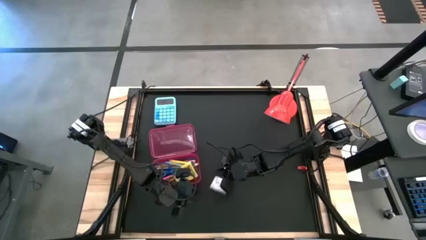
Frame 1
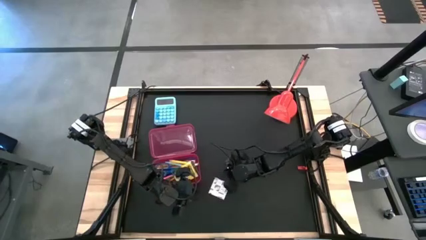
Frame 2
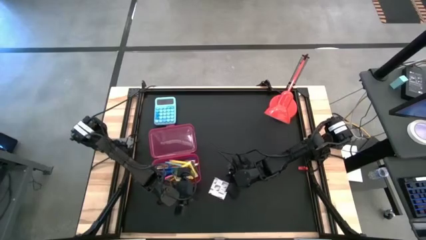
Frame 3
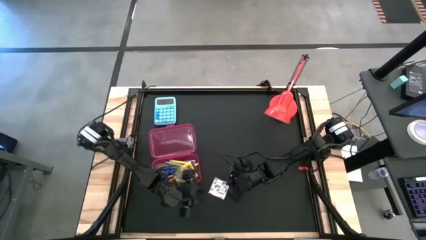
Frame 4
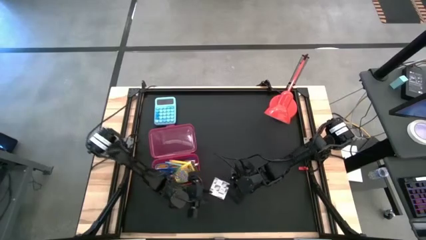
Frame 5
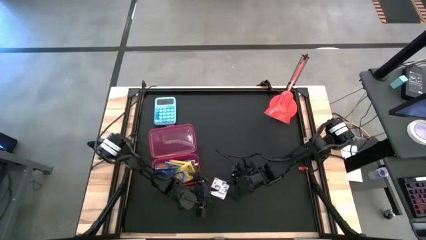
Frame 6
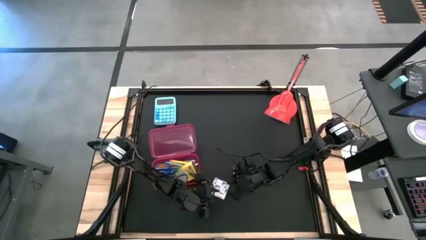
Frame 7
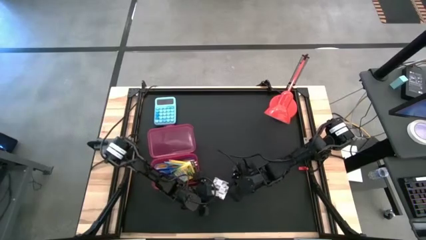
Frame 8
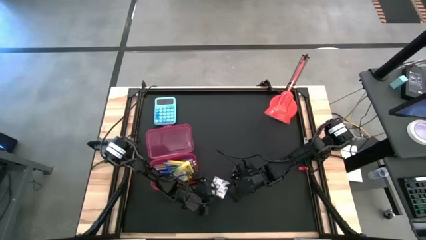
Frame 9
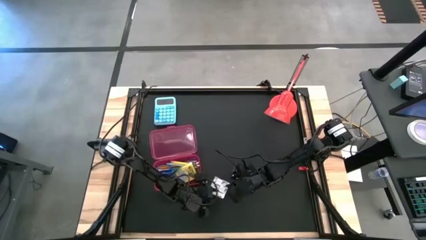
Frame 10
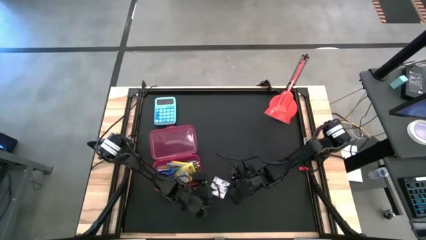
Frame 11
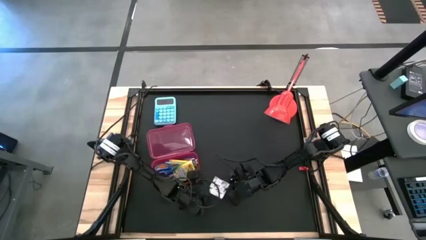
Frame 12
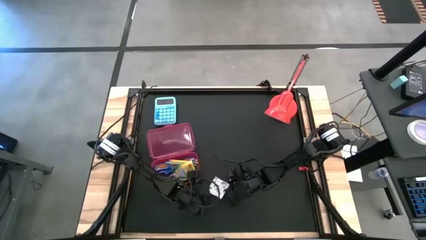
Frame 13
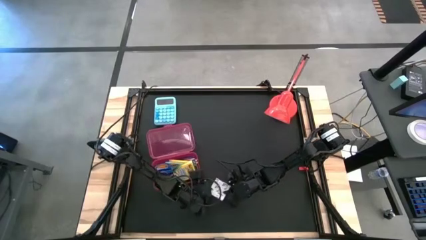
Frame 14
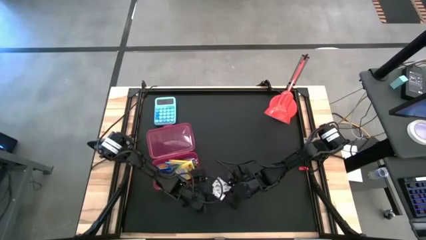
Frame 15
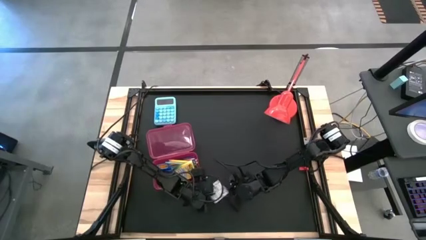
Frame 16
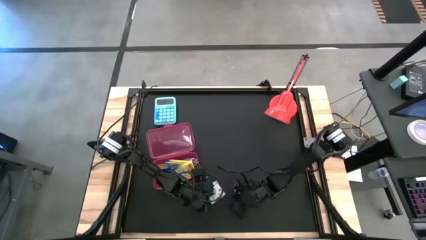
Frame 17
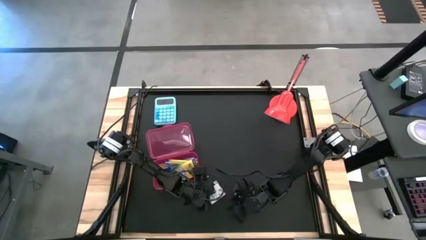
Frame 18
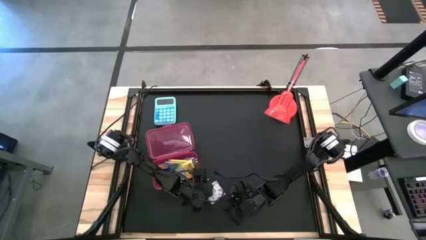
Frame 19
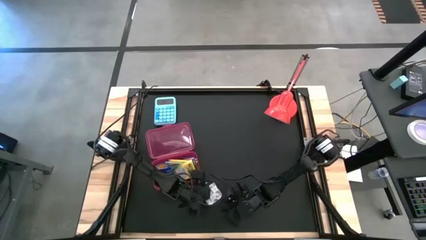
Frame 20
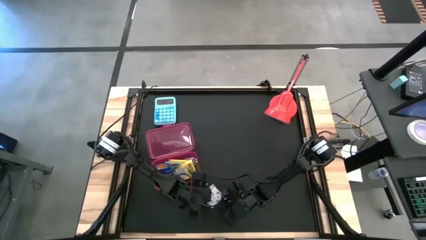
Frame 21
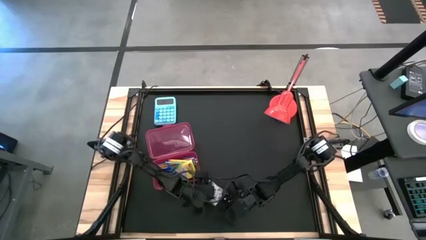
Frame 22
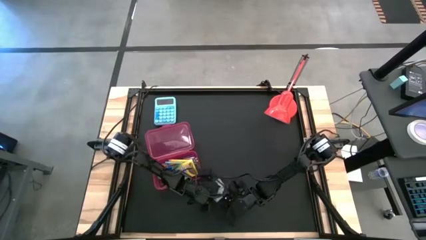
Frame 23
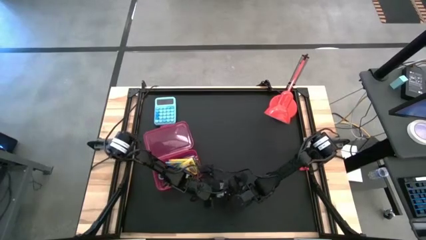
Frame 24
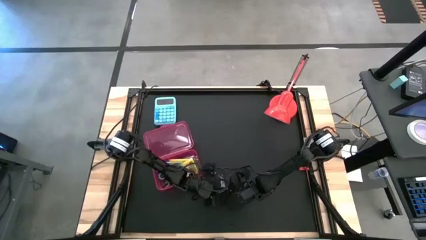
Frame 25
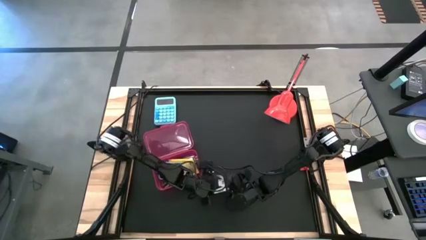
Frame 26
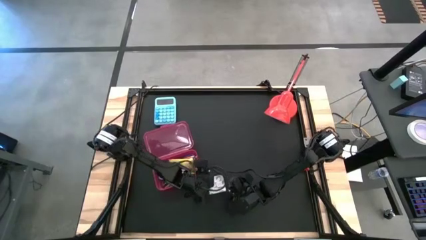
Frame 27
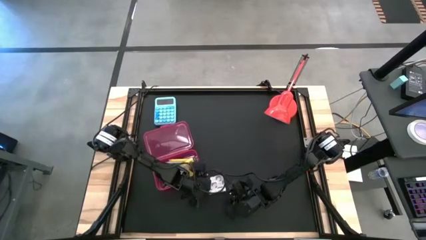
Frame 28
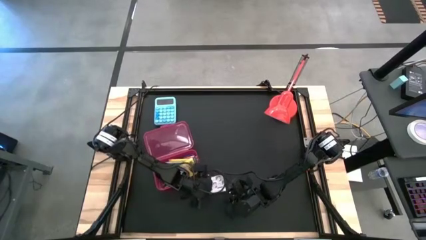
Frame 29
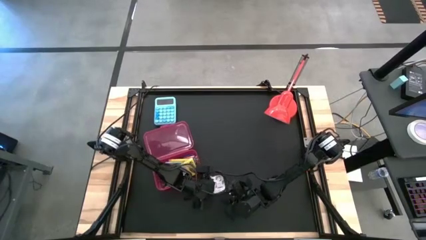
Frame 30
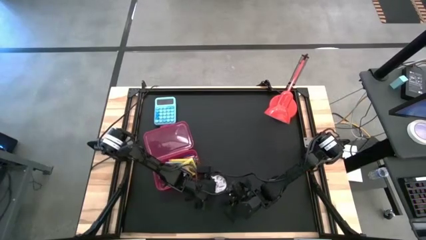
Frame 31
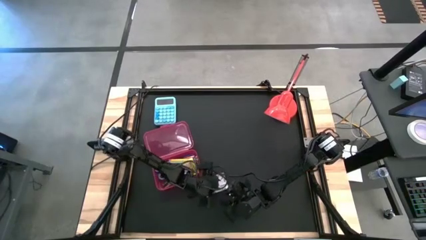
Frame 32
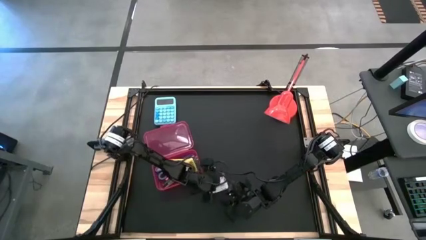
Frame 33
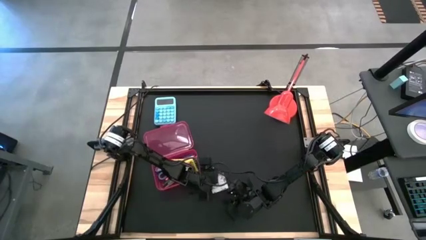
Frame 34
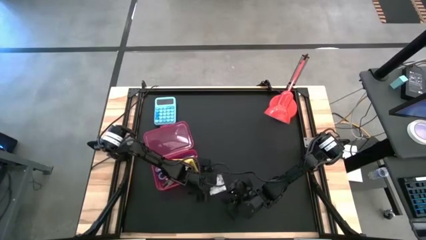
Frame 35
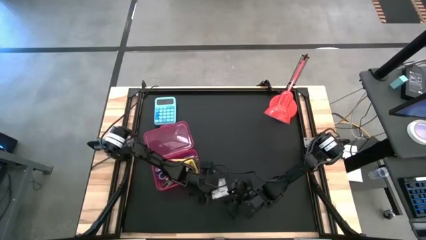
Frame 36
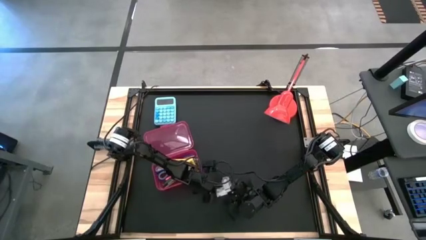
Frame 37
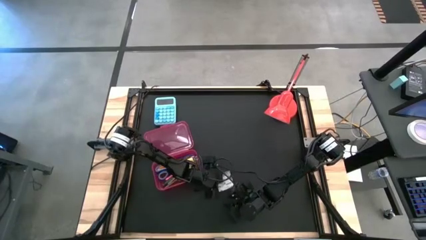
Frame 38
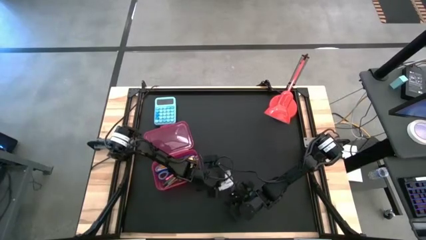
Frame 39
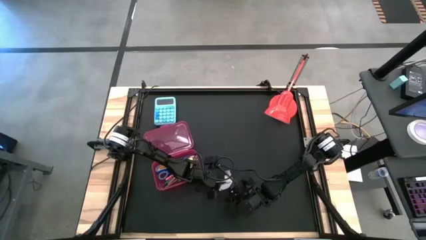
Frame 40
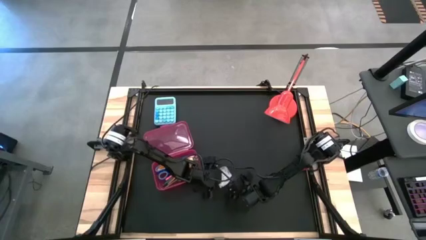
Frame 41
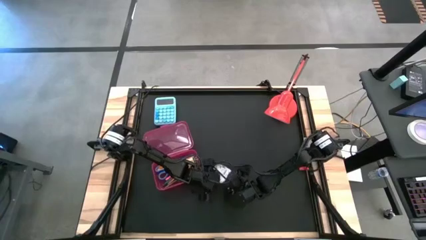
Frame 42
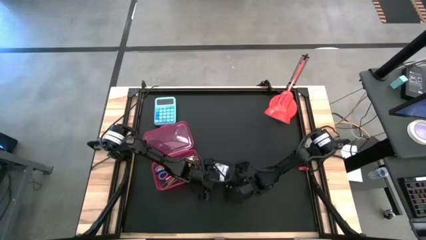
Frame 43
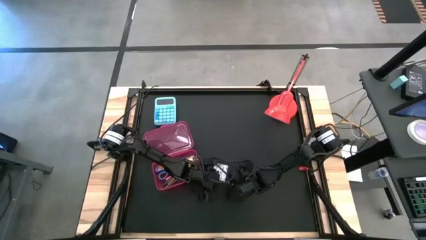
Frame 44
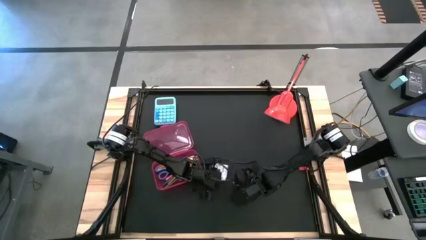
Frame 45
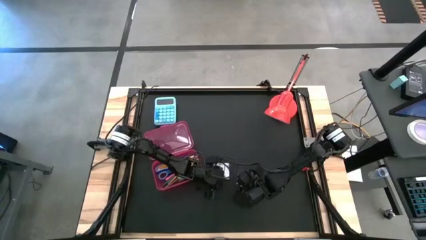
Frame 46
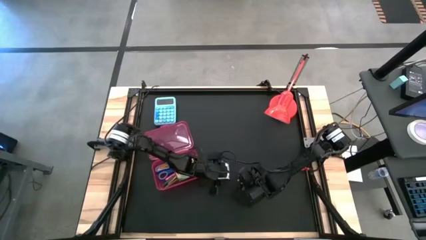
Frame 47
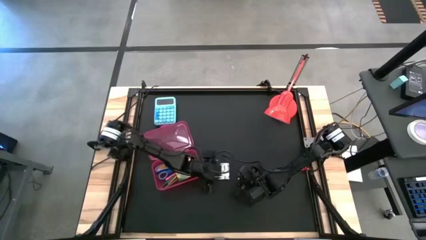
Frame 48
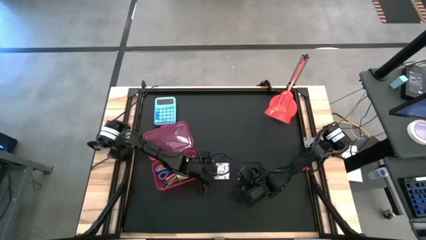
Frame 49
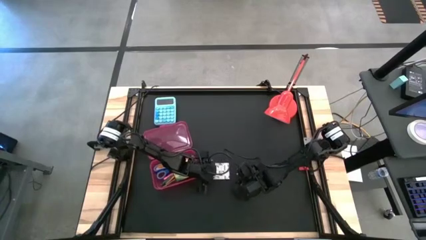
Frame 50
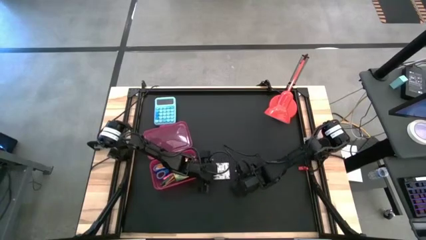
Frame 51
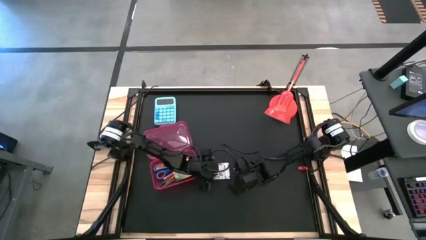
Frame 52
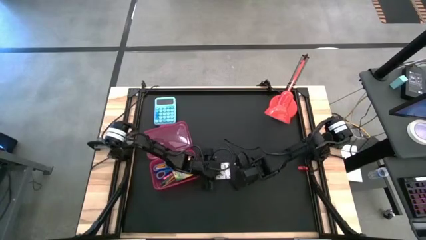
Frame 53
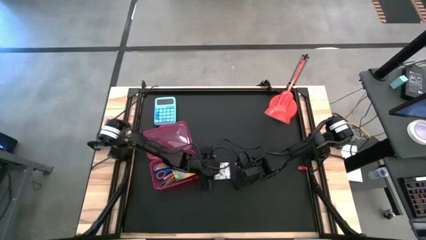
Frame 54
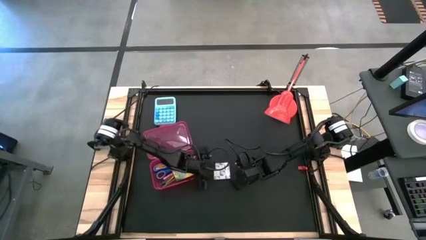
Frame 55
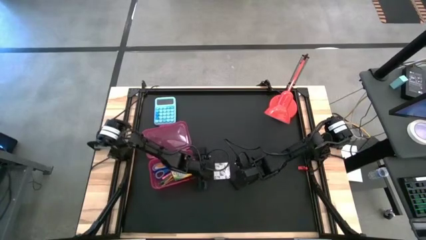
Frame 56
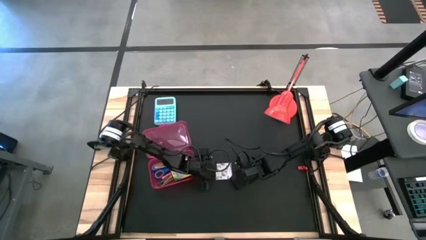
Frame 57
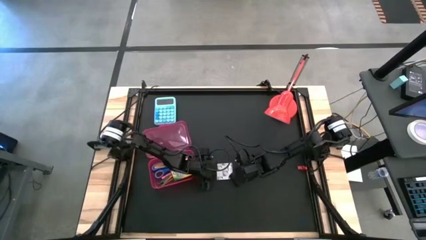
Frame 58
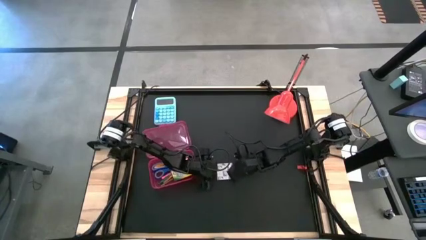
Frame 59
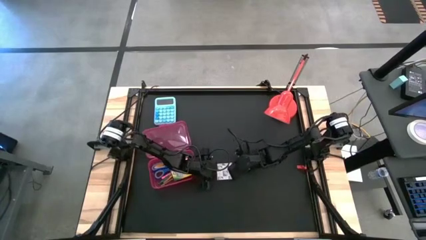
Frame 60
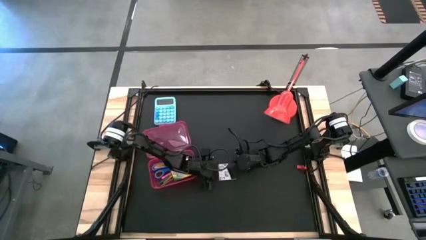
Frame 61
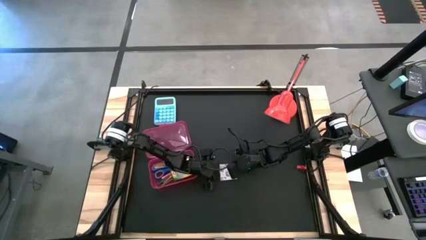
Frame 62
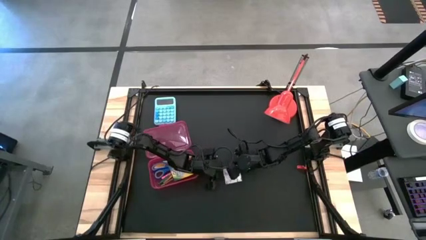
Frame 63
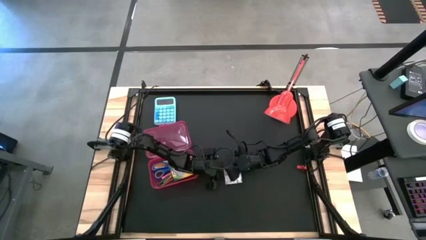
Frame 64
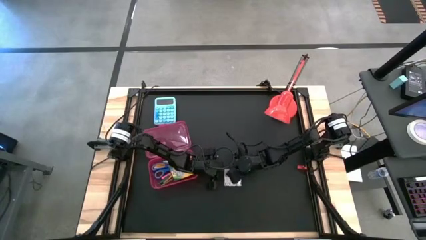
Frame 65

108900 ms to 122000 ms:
Task: Pack school essentials
Put the white sticky notes into the pink supply box

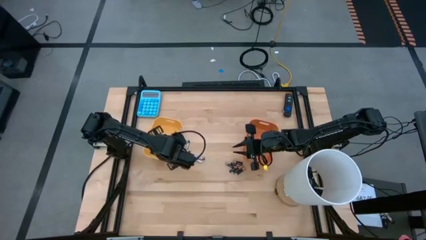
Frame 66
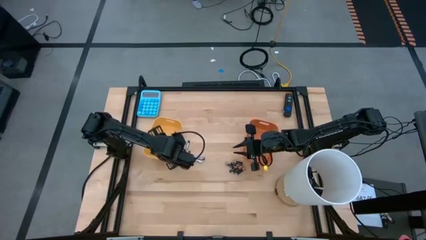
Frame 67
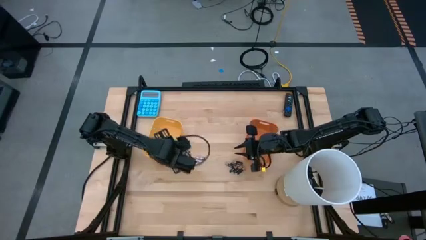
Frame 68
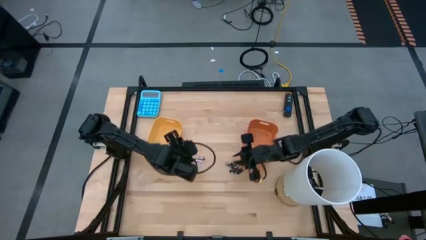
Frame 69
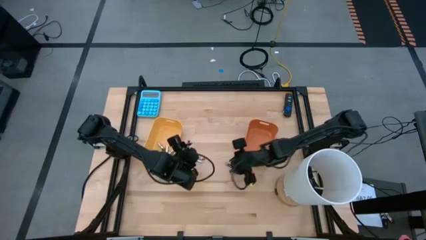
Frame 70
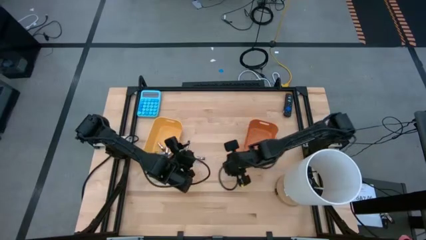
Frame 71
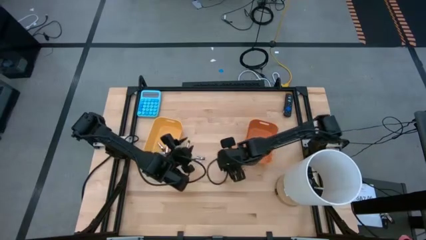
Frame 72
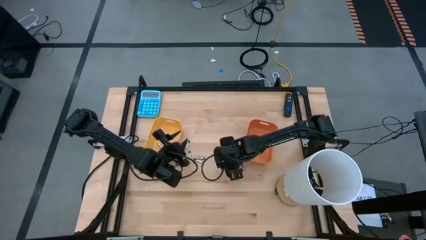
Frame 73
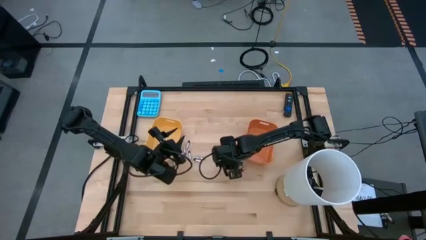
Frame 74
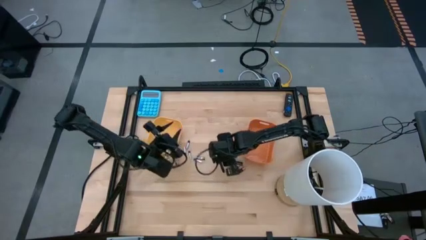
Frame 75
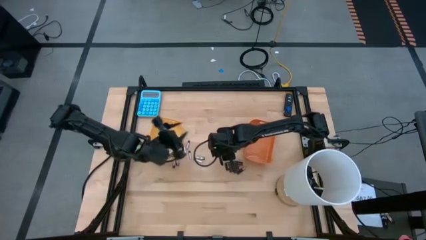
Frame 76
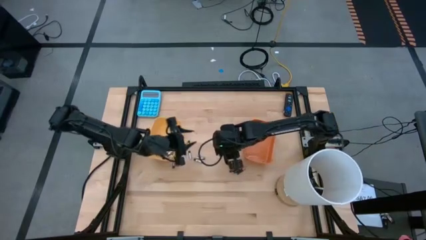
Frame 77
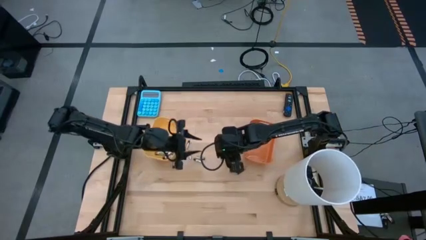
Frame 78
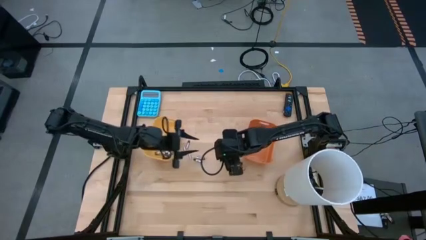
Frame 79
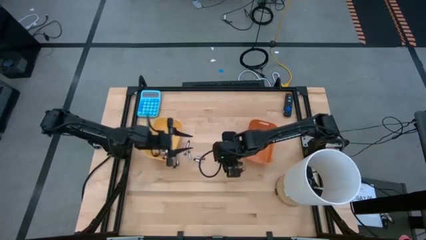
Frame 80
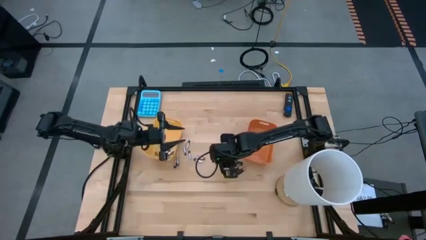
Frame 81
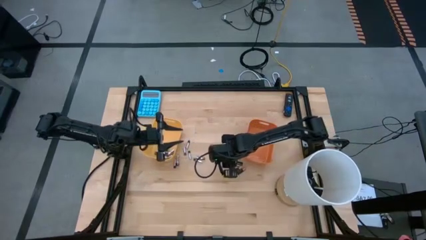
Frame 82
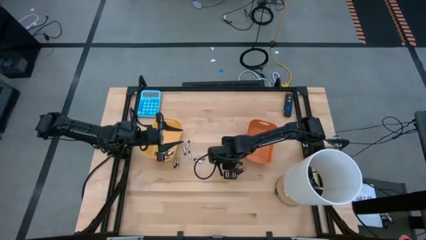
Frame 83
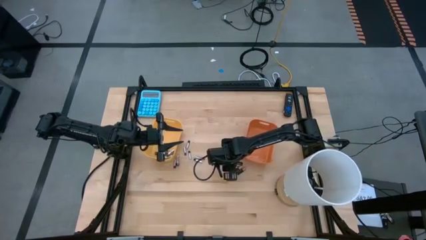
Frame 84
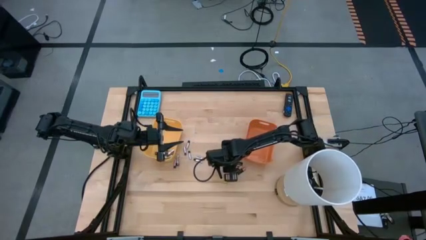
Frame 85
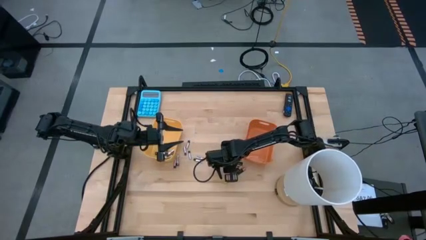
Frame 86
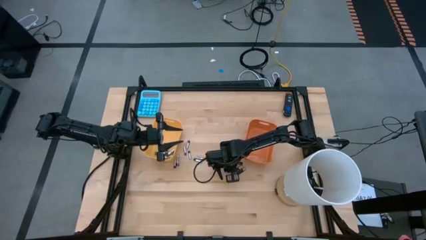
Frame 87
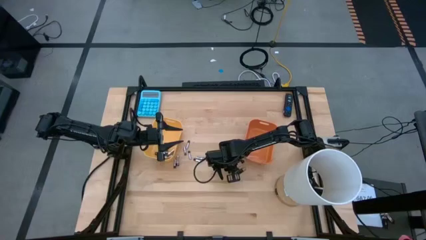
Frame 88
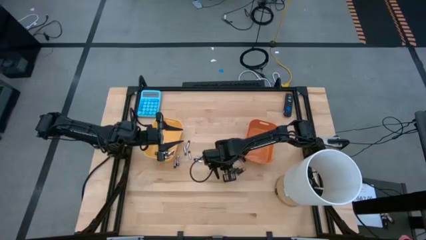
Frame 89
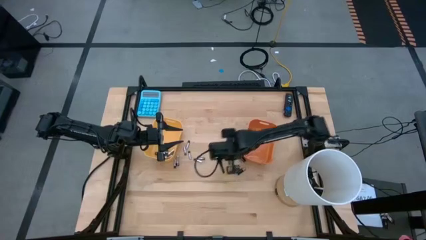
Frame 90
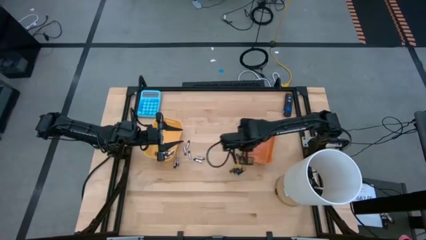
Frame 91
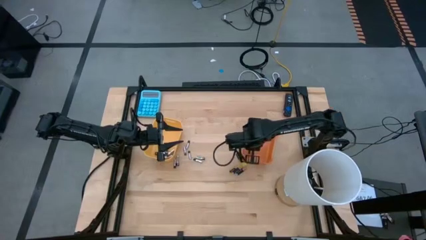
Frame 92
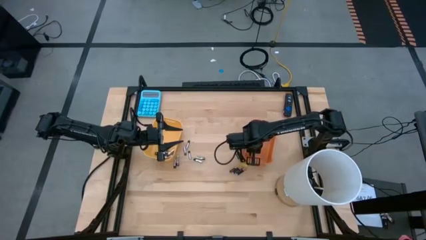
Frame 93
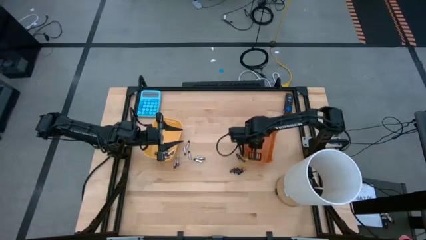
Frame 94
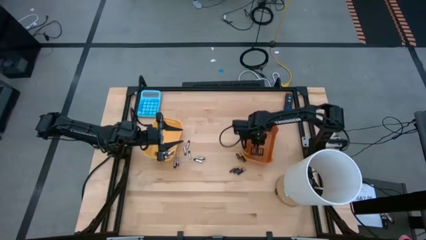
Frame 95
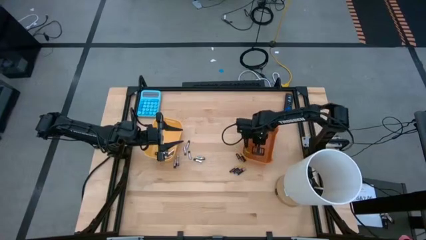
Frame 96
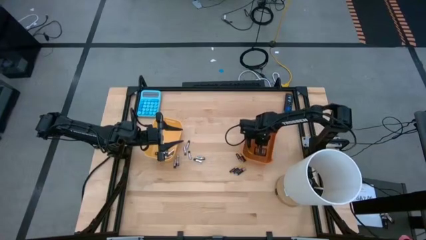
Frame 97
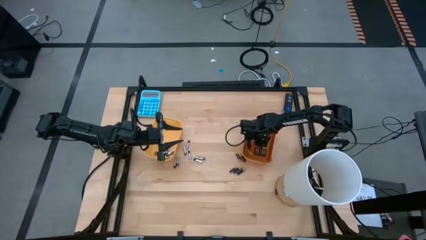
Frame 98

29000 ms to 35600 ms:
Task: Sort batteries
Put the black battery into the orange bin
